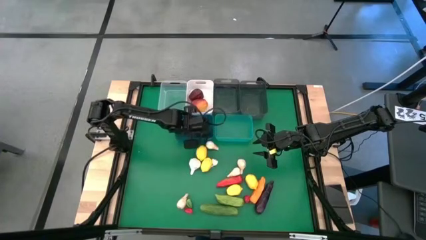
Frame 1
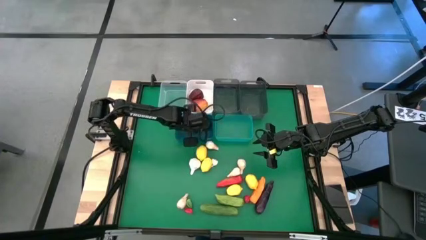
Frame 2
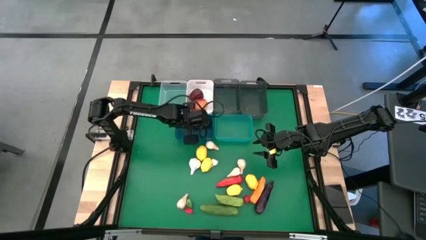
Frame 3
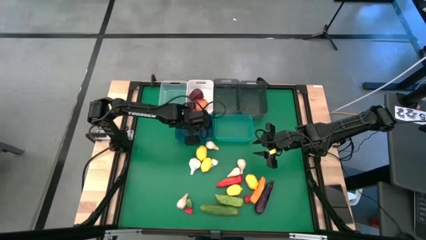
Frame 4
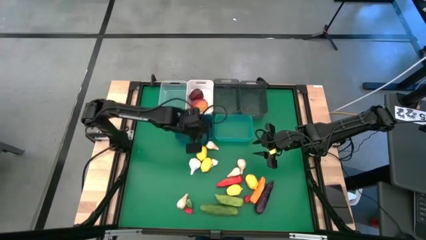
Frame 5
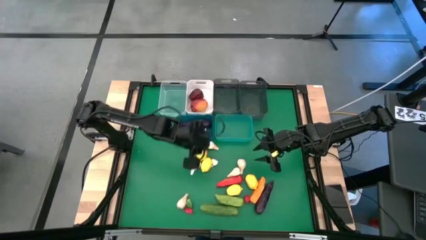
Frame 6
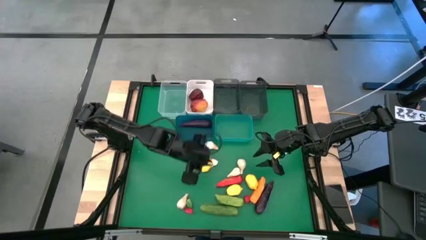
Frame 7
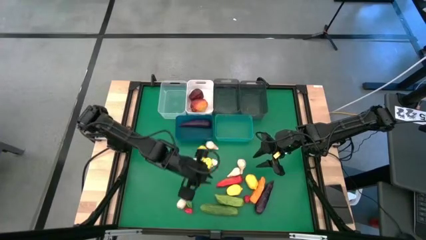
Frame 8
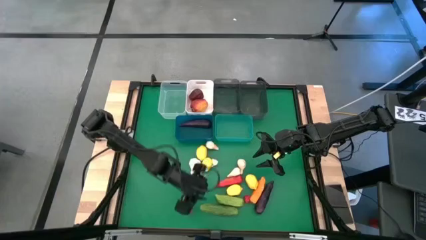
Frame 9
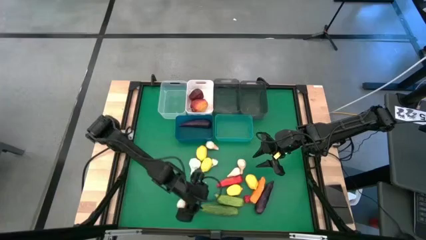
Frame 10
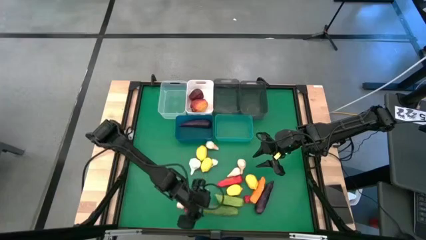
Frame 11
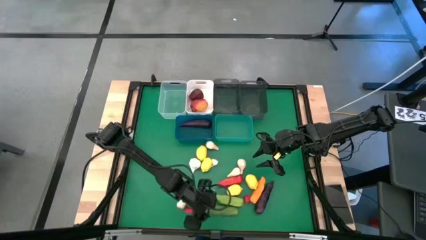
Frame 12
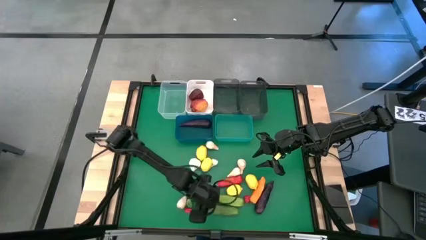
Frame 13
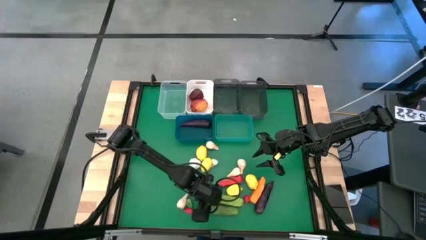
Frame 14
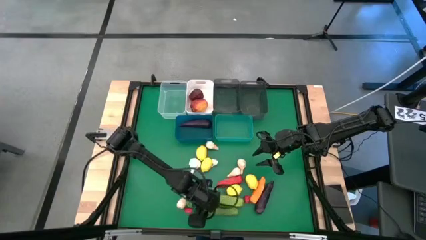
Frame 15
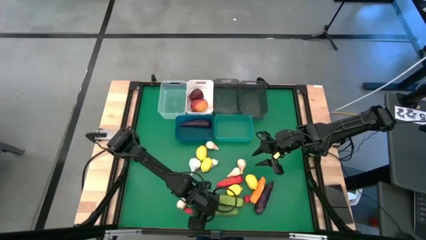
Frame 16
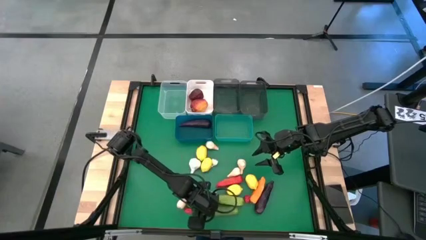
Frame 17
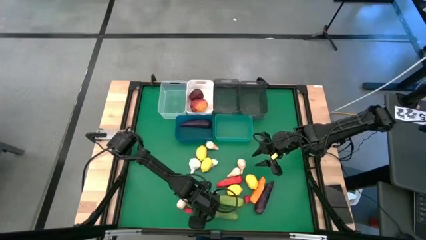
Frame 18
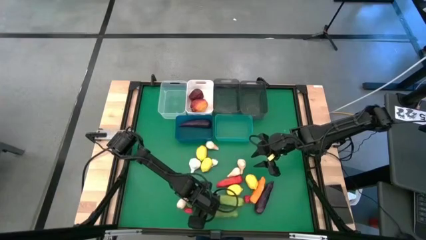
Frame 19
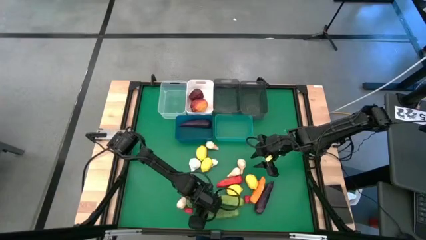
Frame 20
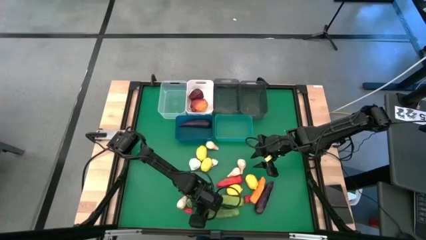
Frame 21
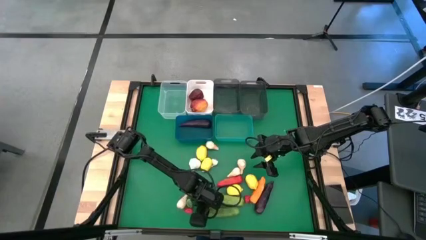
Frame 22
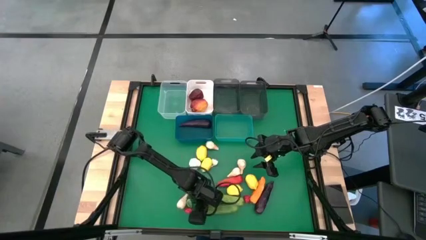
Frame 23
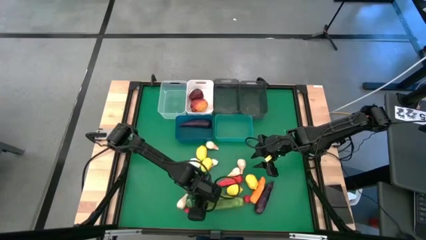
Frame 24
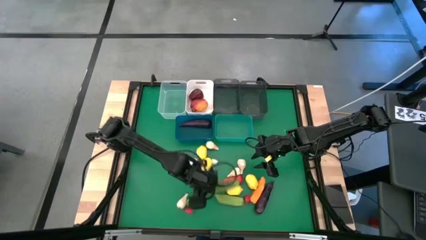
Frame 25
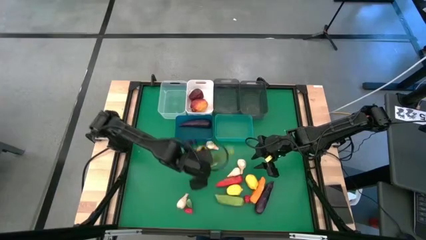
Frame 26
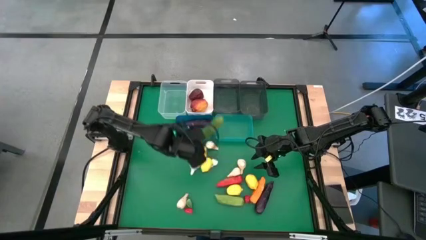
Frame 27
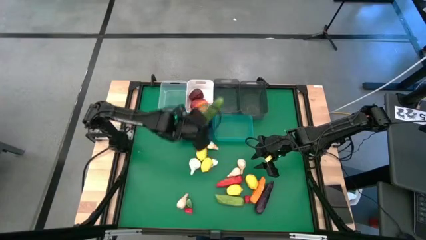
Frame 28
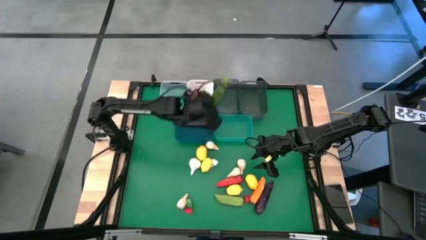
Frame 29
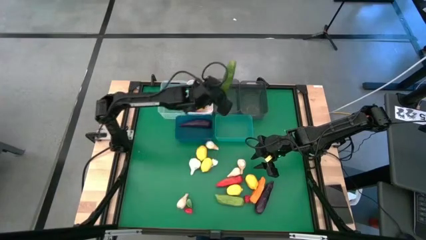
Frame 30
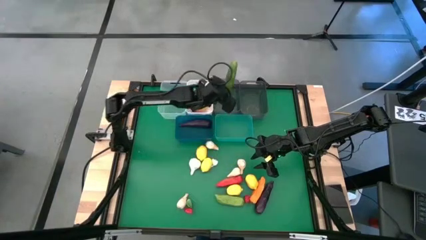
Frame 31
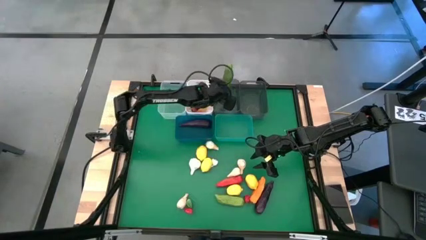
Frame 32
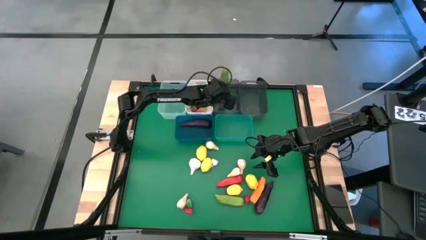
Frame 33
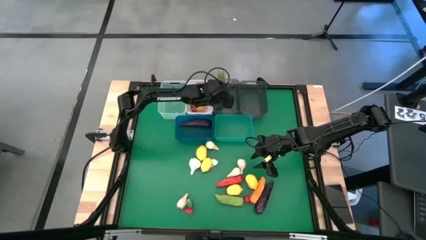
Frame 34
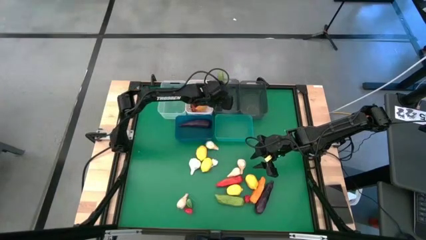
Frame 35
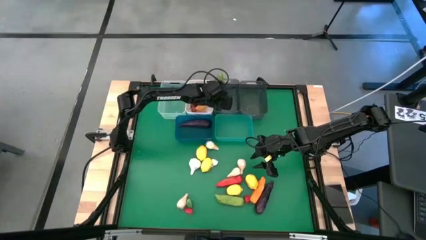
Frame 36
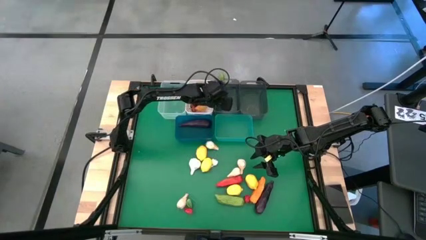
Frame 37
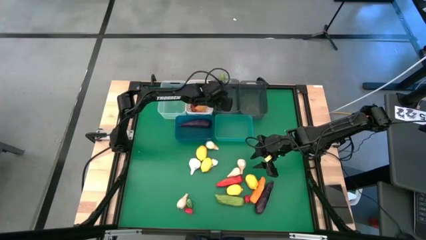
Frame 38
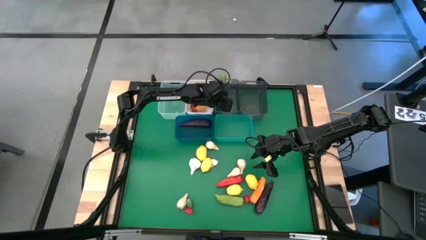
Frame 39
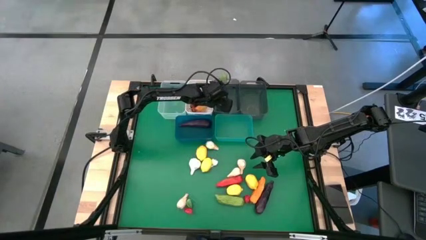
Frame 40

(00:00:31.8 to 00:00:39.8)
Task: Sort produce into baskets
Put the cucumber into the left black bin

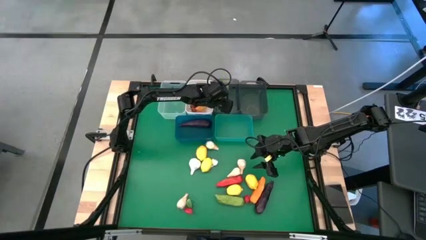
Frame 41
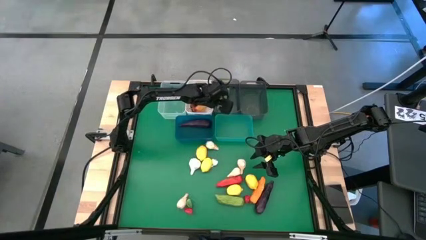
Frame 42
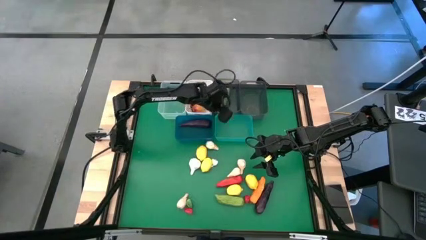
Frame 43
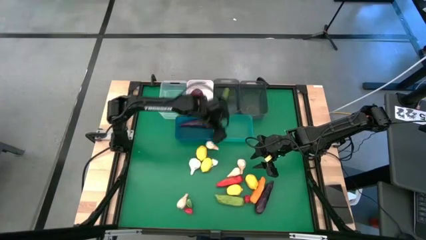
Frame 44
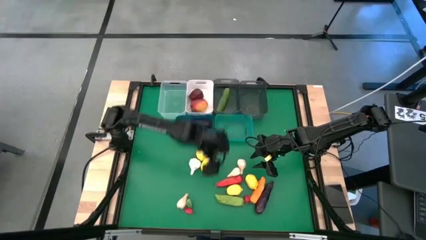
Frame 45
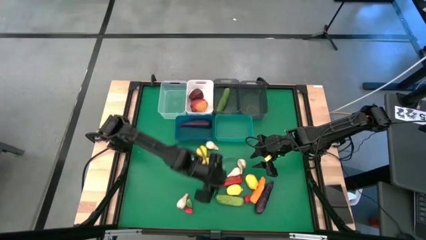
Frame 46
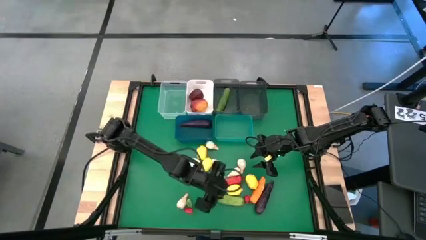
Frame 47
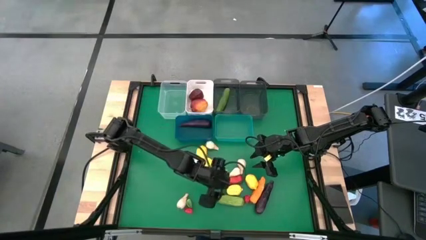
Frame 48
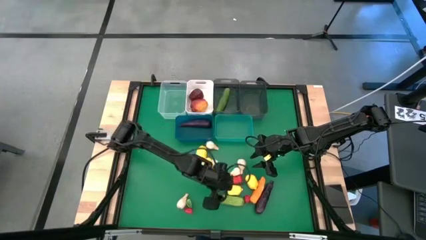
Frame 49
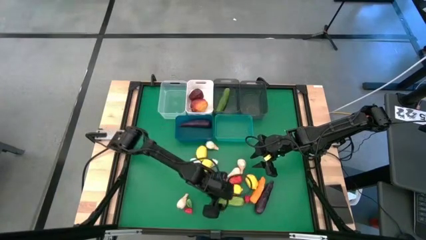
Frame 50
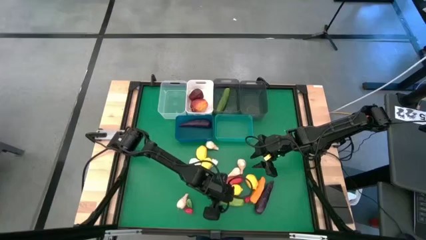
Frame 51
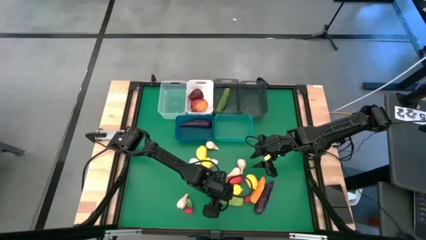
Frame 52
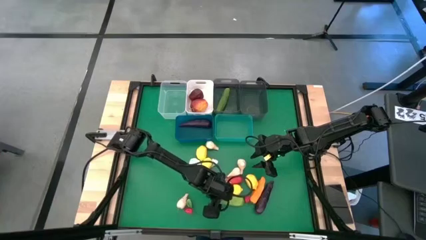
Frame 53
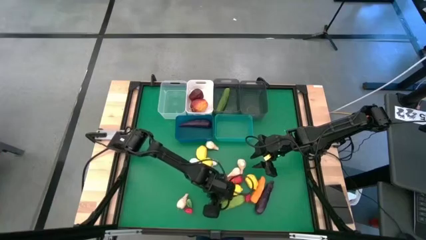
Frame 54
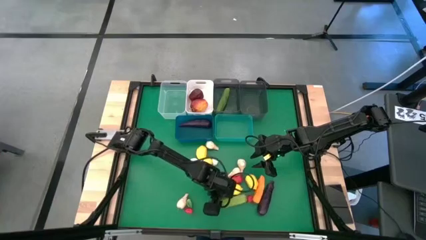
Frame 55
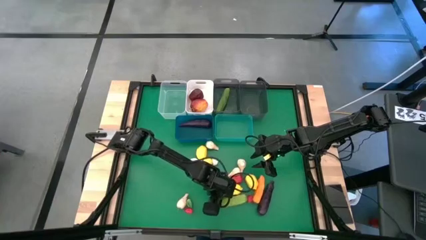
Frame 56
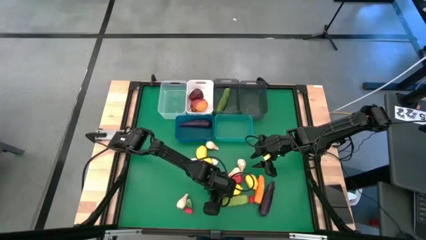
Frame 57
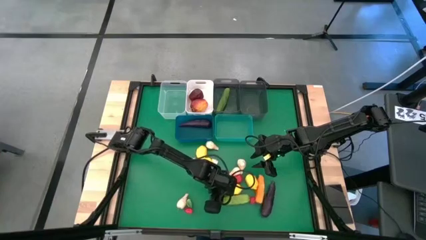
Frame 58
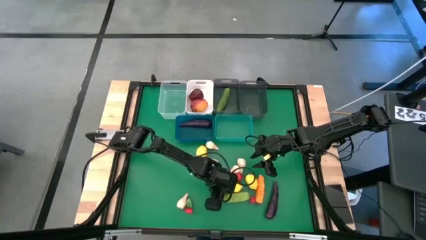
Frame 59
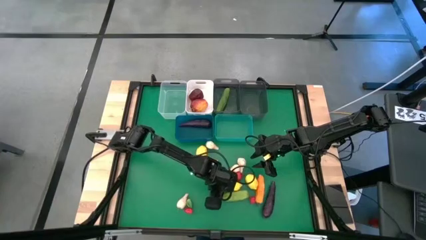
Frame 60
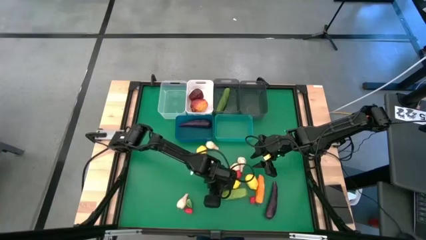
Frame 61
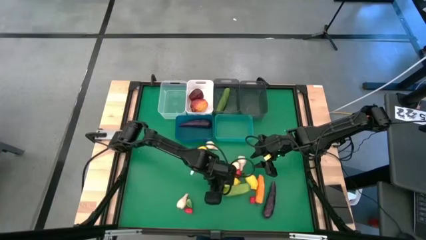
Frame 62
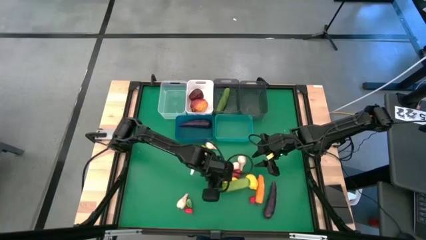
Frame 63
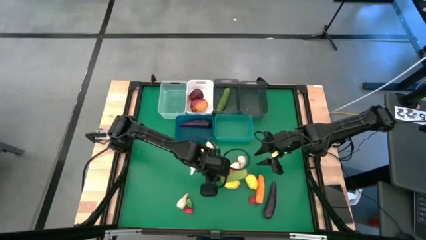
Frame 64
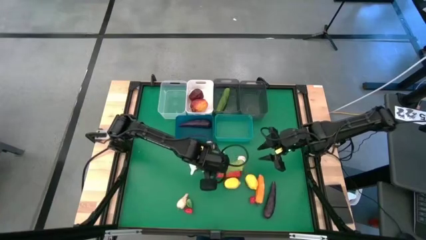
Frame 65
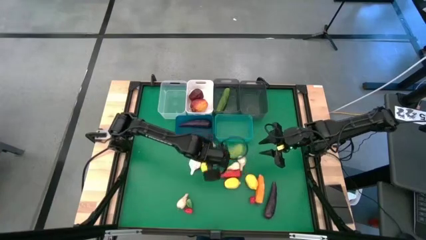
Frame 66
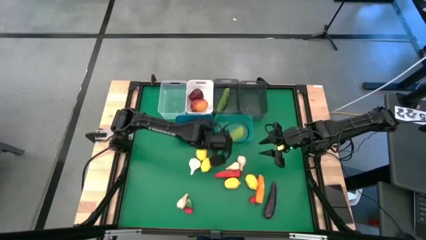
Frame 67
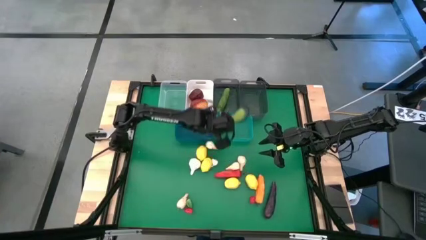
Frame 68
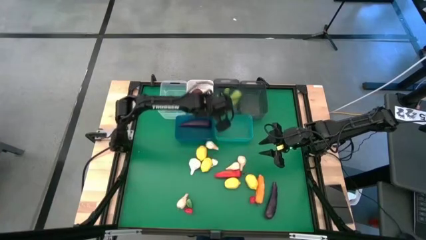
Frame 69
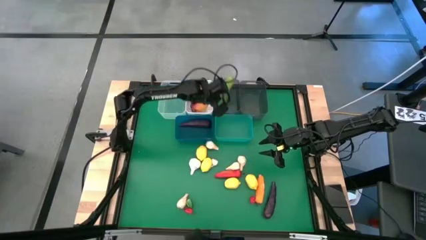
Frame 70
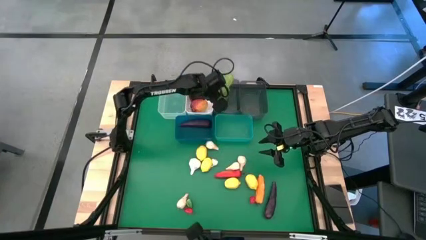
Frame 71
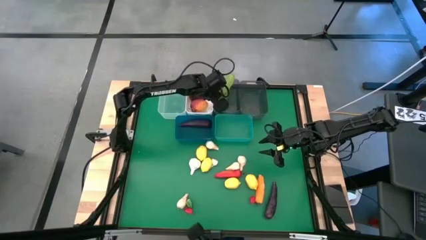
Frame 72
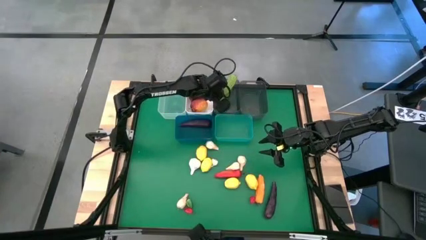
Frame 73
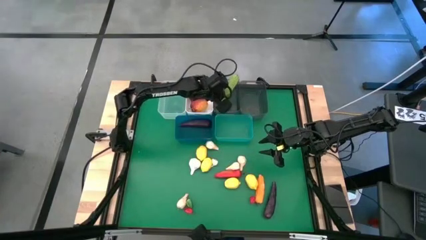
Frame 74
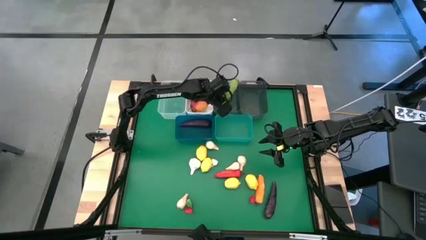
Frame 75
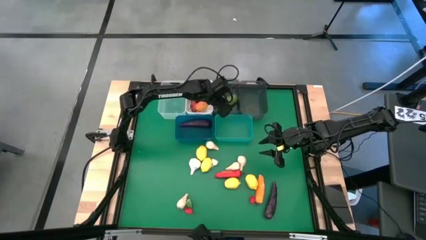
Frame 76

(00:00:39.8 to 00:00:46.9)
Put the cucumber into the left black bin
